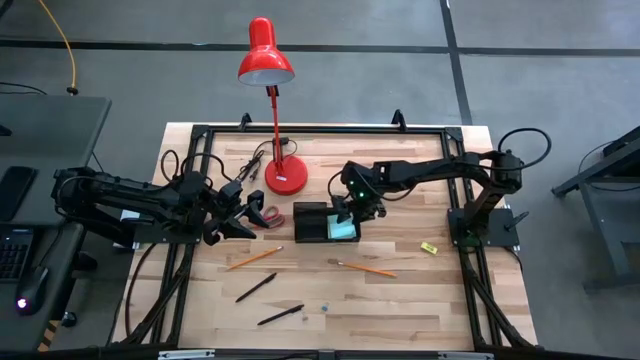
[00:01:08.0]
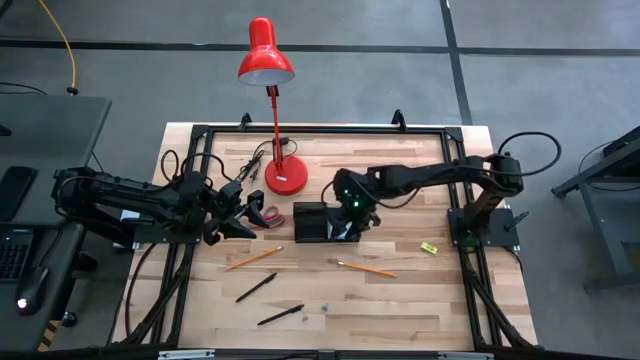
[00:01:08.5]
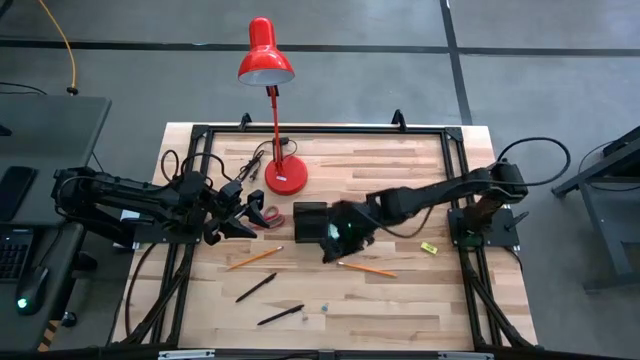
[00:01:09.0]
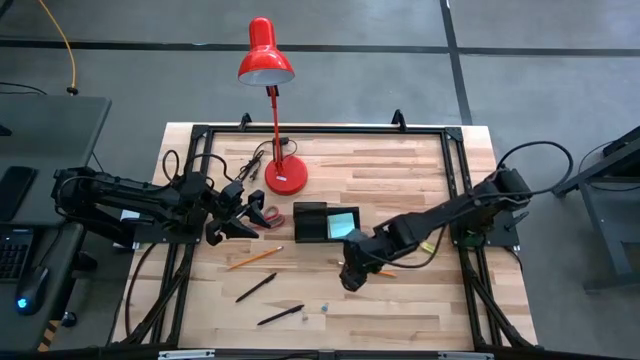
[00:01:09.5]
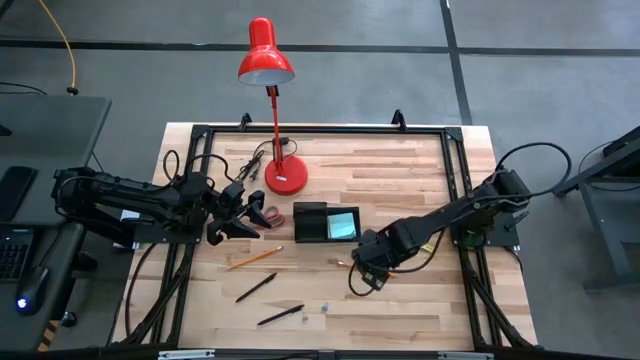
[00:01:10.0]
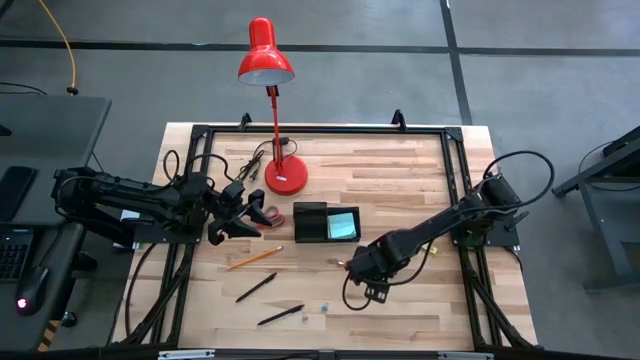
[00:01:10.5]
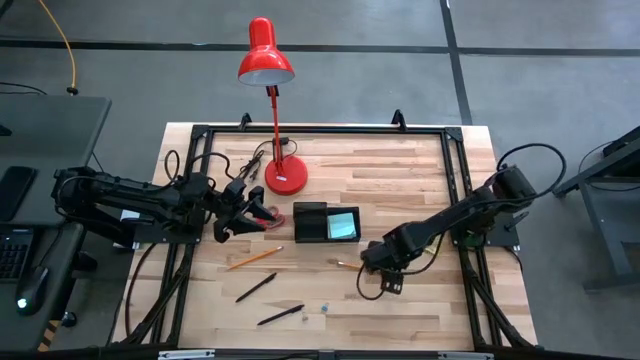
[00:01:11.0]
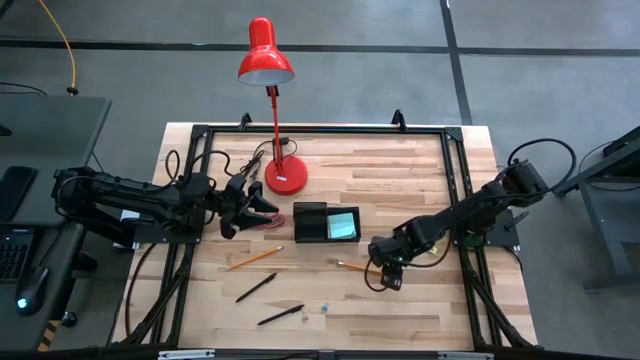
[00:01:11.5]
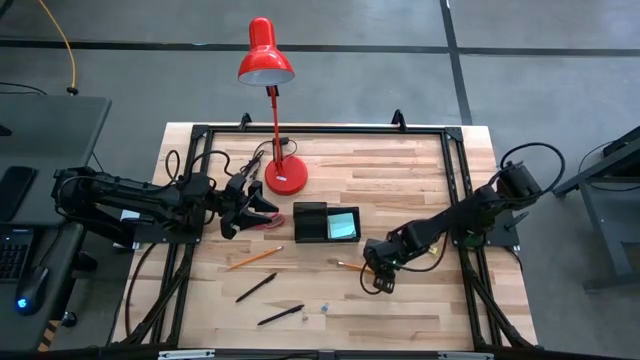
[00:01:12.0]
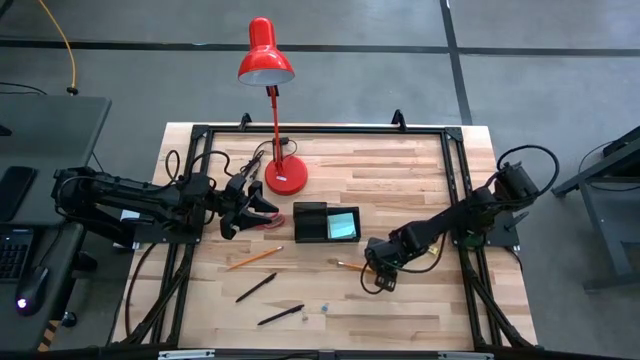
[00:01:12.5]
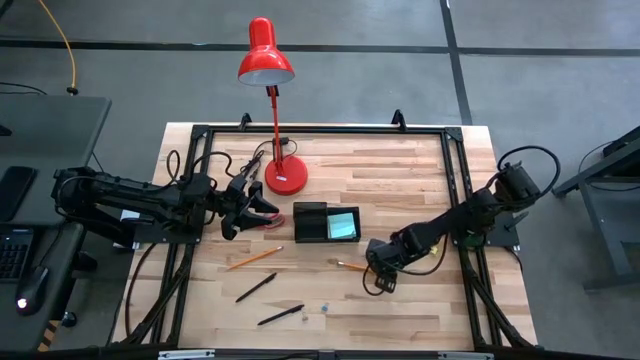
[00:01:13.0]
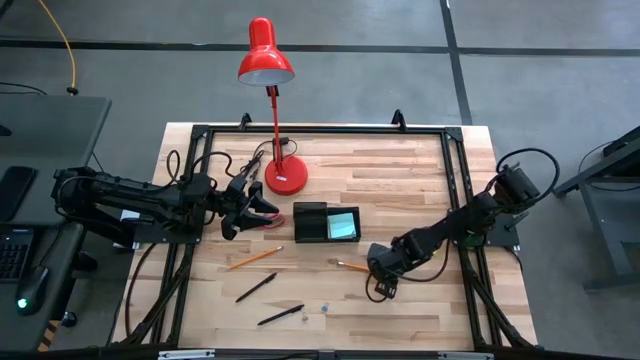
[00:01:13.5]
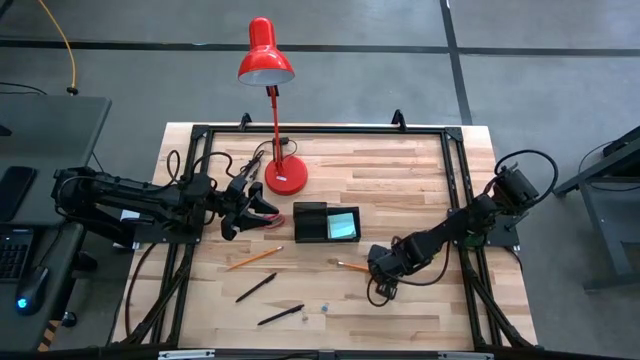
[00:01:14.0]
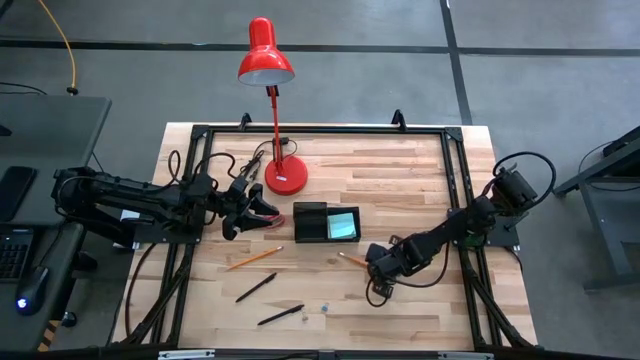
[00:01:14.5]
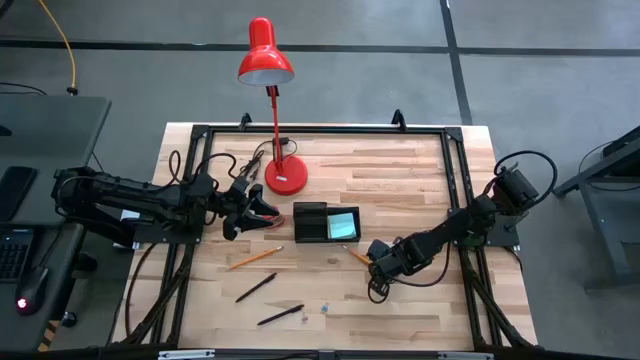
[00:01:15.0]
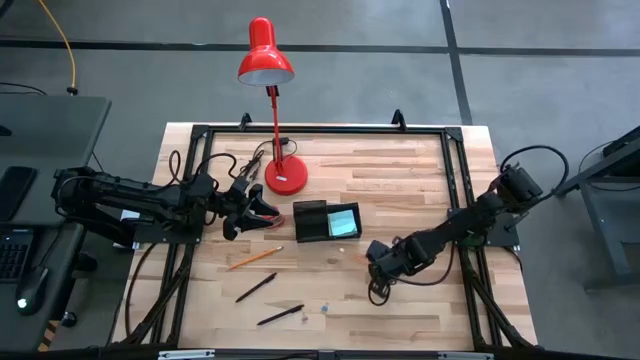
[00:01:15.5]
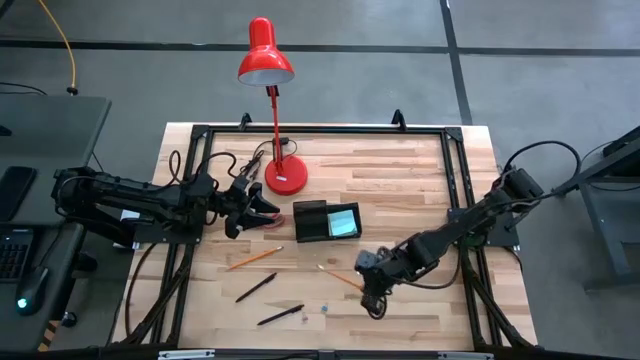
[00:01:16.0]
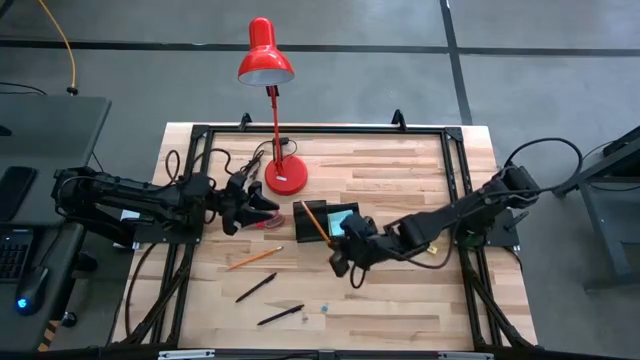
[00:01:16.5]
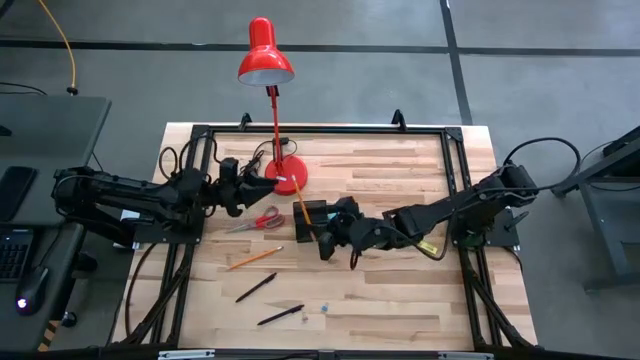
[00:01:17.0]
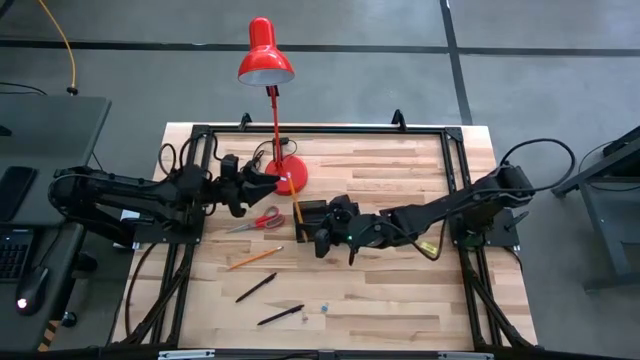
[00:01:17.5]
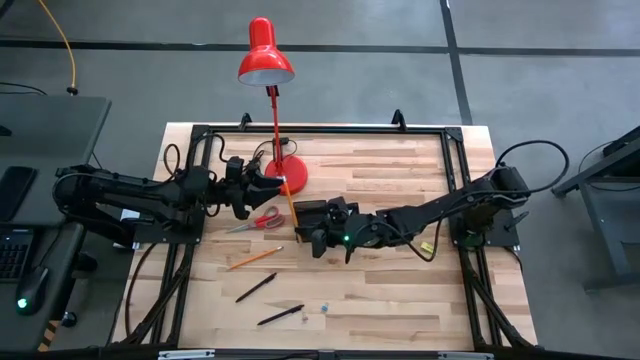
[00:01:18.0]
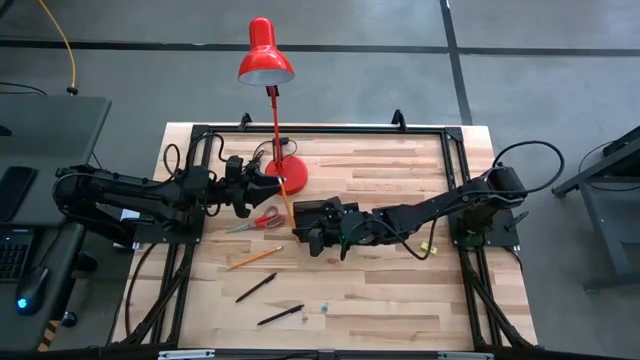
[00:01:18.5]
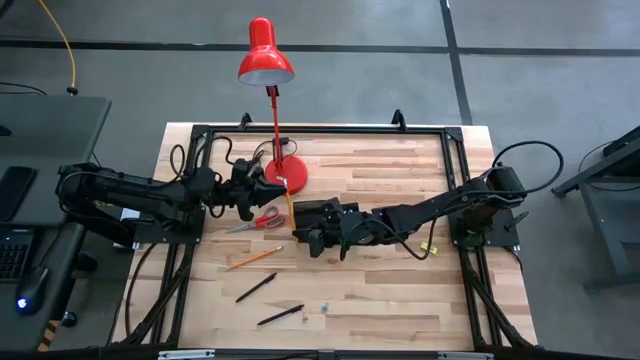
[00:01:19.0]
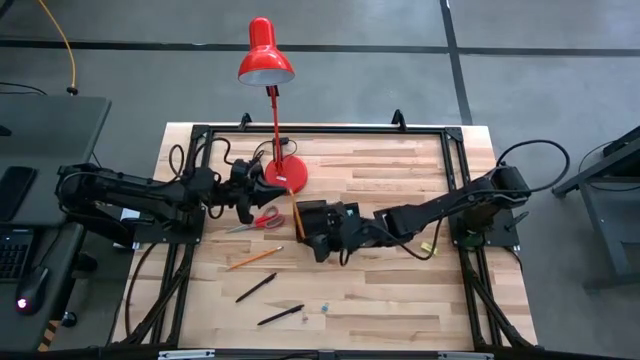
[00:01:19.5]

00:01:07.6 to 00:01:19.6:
Task: Pick and place office supplies into organizer
Put the orange pencil into the black desk organizer
